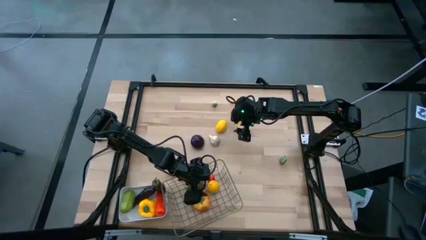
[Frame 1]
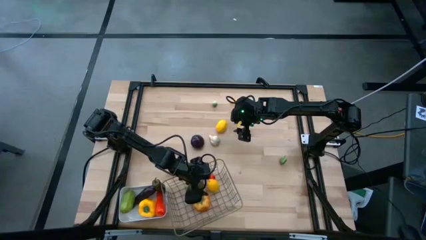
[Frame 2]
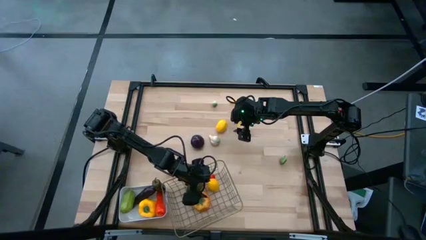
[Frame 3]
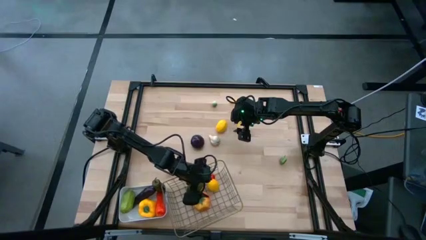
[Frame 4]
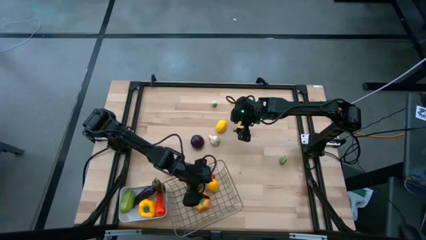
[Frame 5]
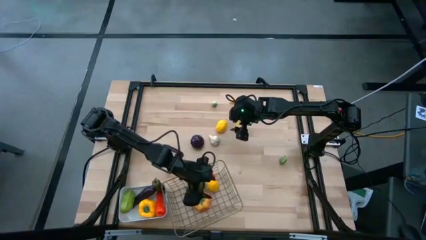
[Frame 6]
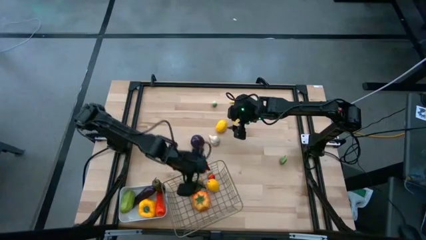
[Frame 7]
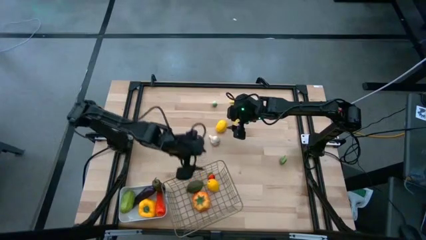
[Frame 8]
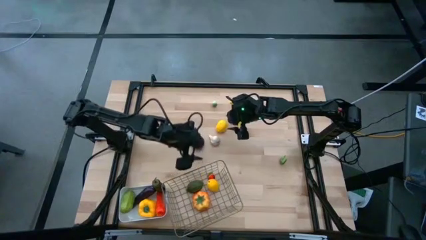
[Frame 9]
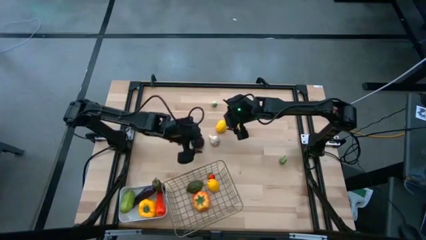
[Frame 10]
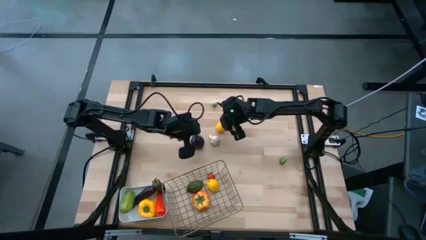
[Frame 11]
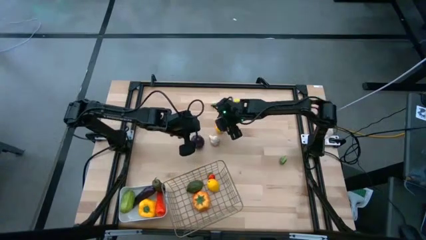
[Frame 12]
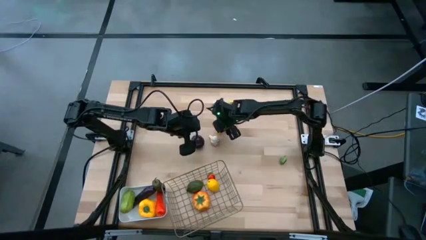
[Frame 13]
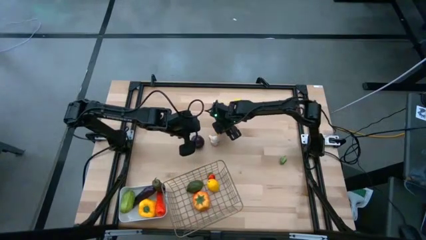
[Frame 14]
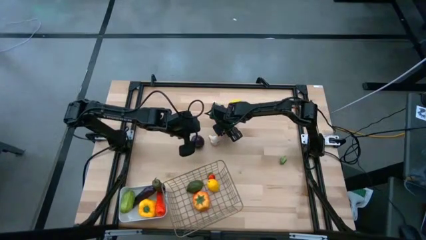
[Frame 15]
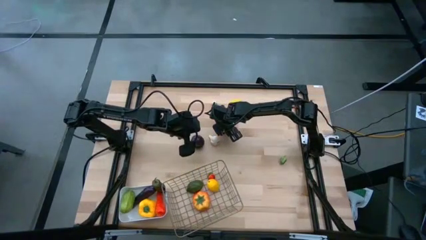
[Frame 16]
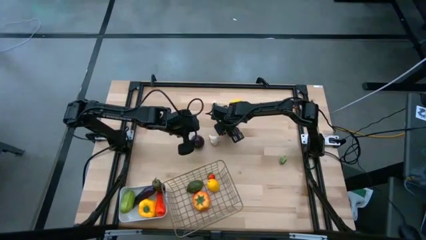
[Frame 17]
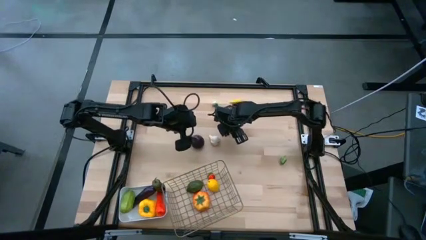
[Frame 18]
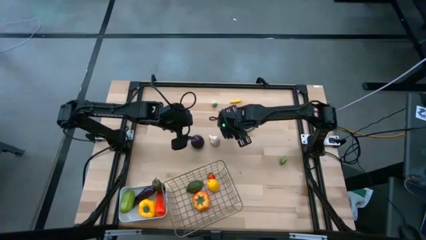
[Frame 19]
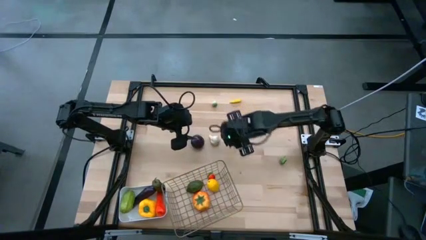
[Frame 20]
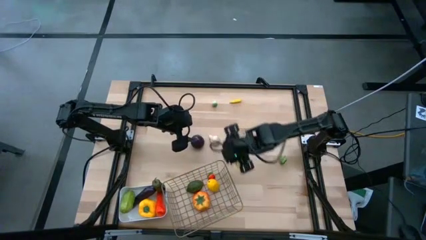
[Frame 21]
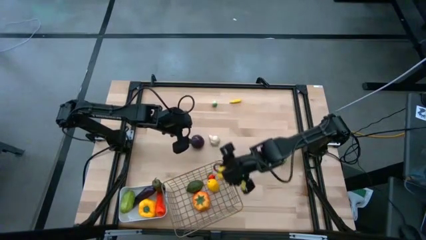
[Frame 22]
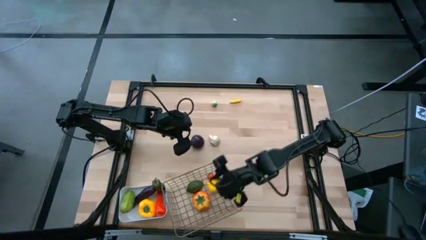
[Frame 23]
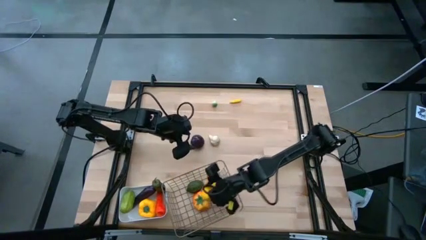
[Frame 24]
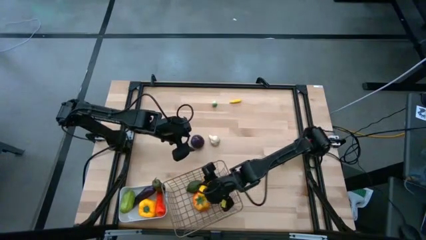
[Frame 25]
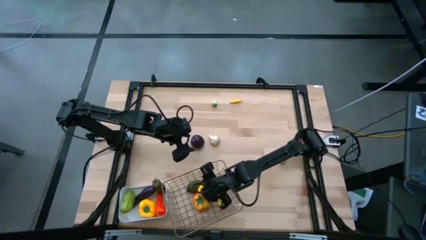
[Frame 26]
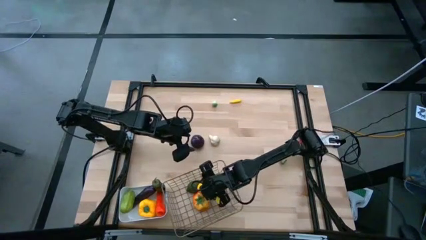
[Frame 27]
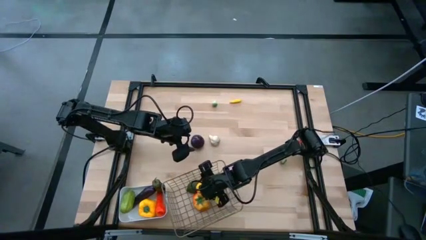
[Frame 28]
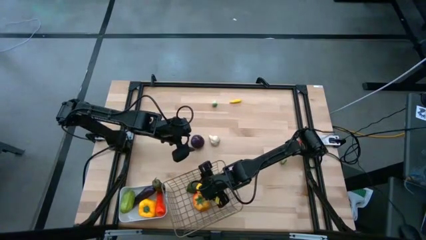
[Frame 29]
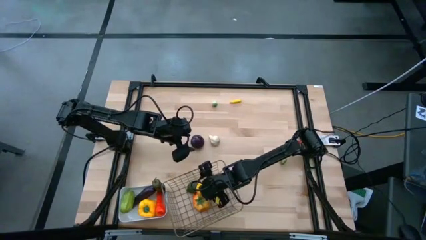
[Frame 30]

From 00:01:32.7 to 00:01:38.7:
Task: Sort produce into baskets
Put the yellow lemon into the wire basket

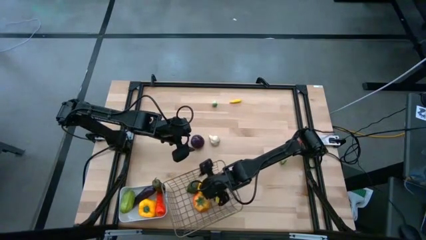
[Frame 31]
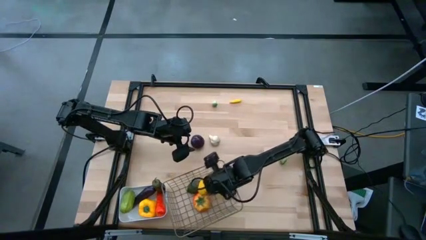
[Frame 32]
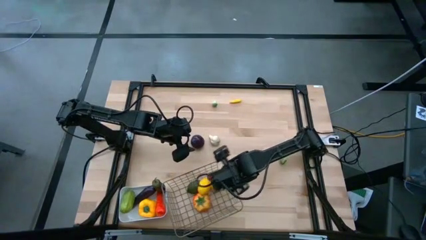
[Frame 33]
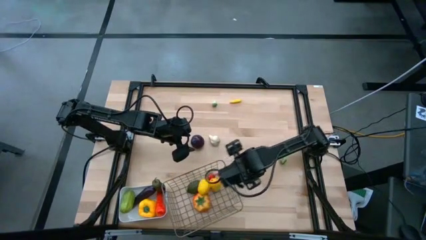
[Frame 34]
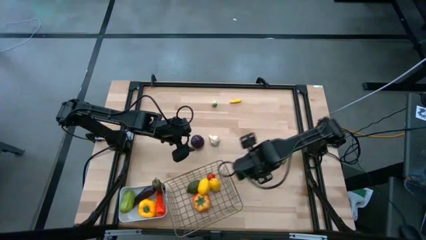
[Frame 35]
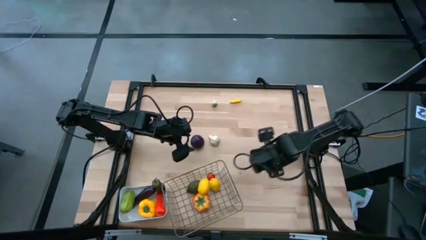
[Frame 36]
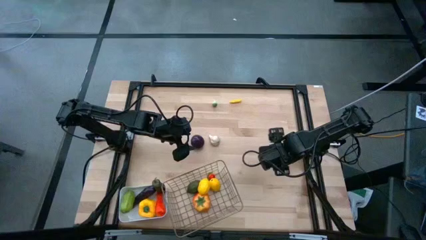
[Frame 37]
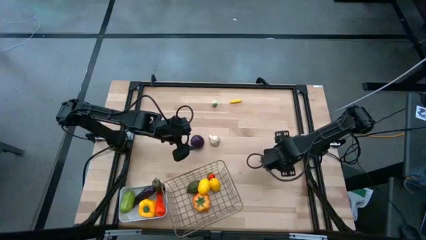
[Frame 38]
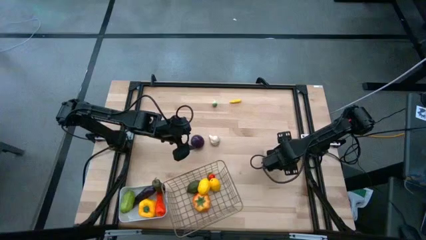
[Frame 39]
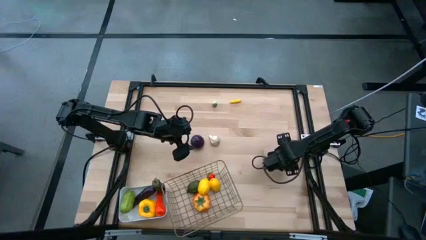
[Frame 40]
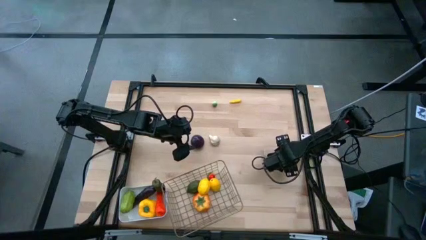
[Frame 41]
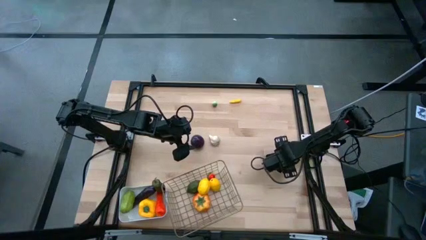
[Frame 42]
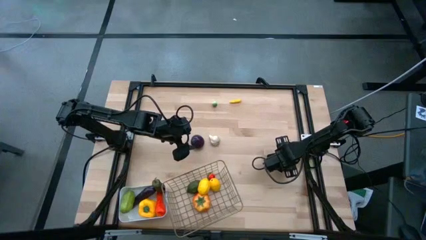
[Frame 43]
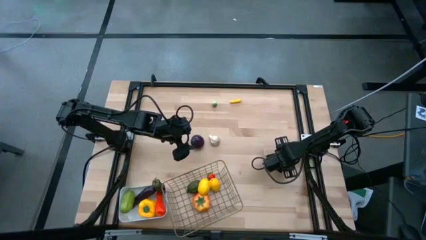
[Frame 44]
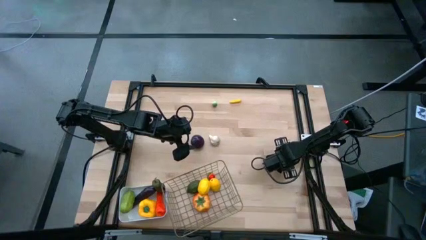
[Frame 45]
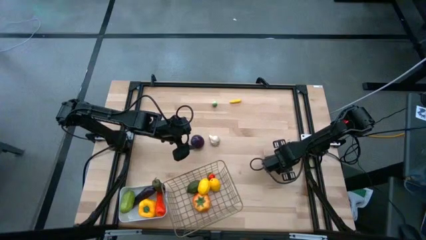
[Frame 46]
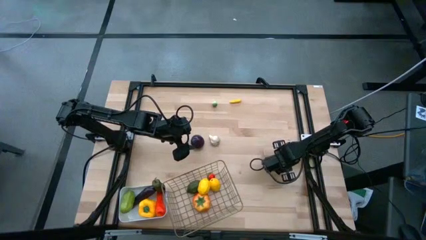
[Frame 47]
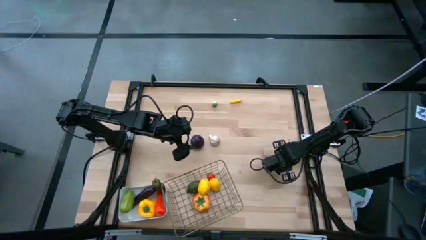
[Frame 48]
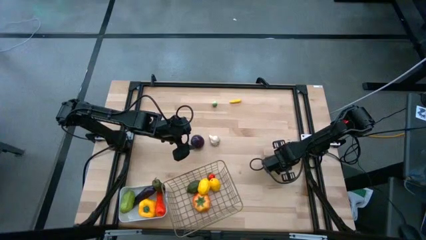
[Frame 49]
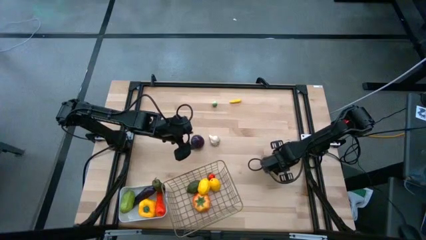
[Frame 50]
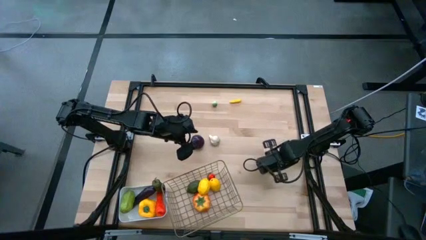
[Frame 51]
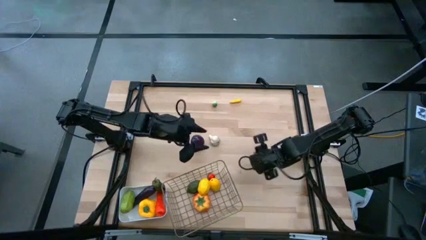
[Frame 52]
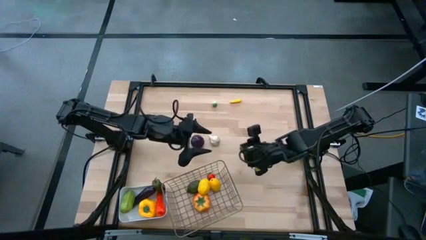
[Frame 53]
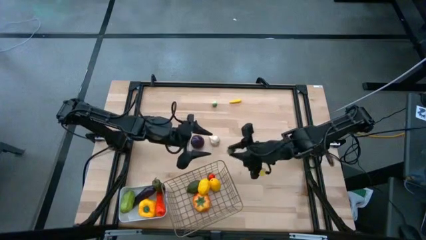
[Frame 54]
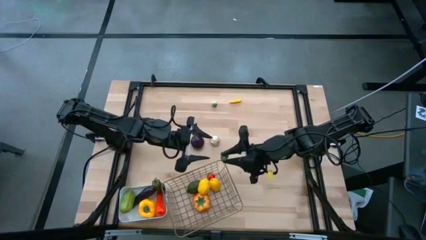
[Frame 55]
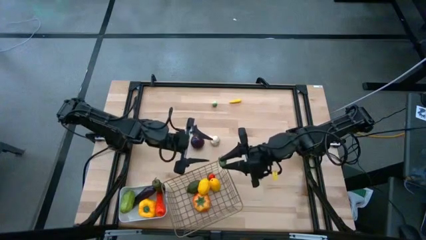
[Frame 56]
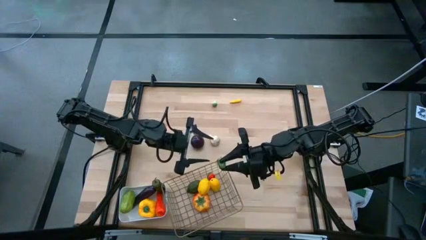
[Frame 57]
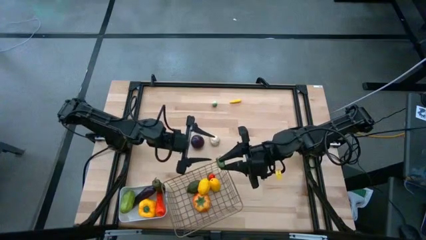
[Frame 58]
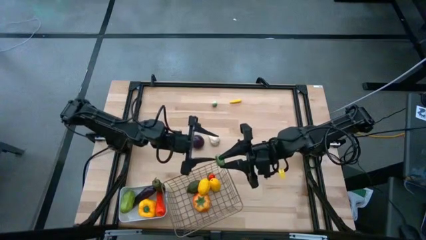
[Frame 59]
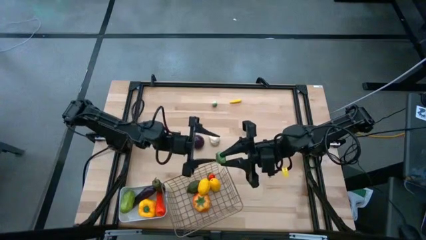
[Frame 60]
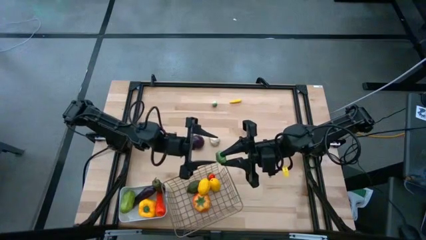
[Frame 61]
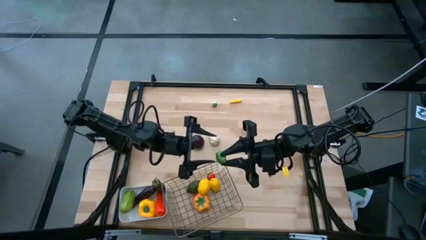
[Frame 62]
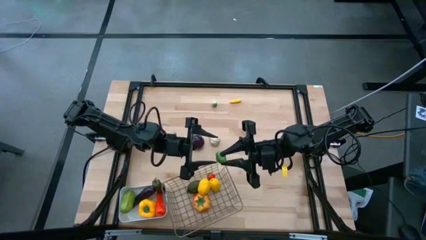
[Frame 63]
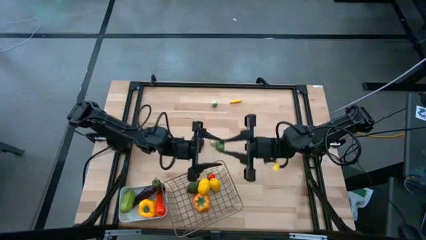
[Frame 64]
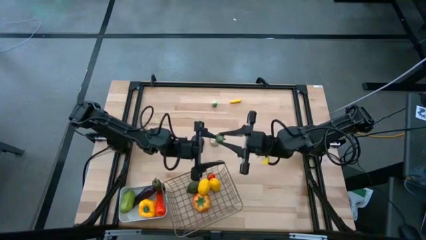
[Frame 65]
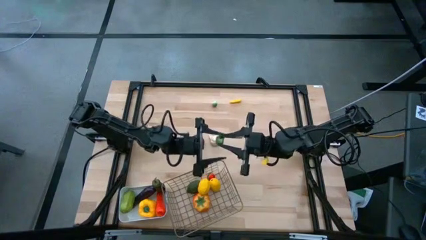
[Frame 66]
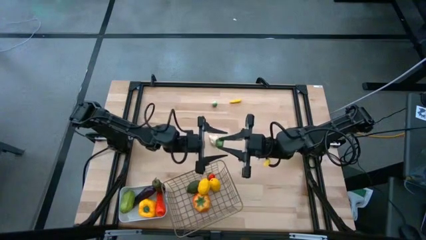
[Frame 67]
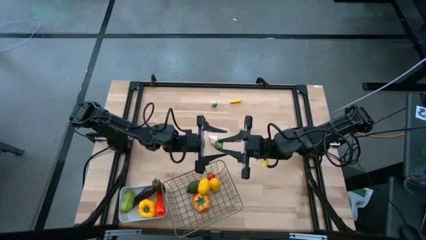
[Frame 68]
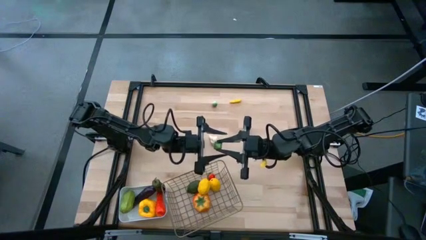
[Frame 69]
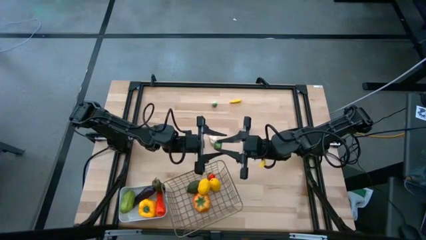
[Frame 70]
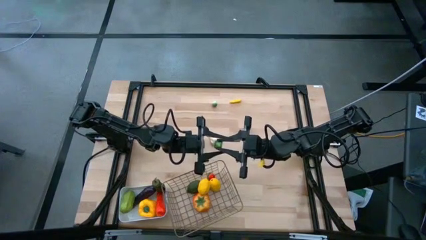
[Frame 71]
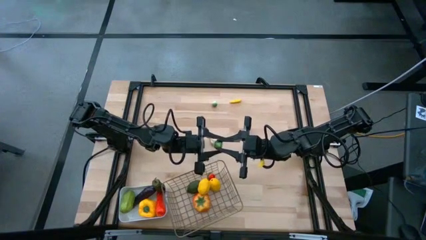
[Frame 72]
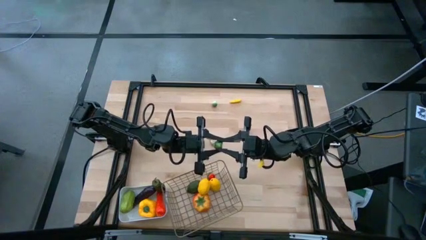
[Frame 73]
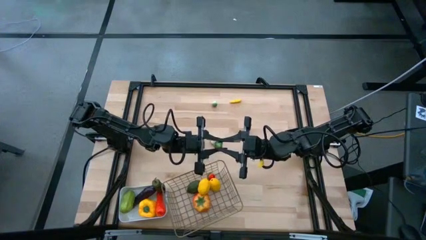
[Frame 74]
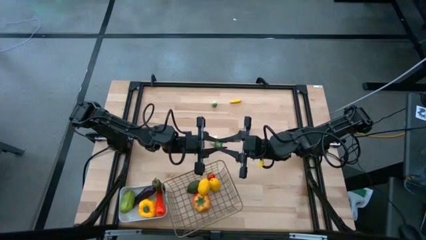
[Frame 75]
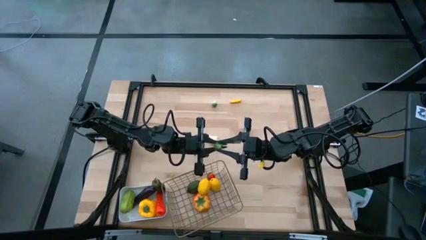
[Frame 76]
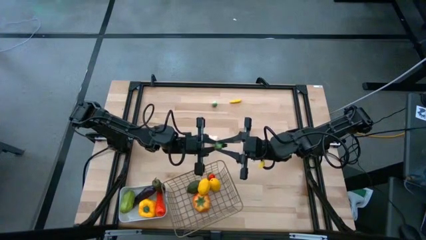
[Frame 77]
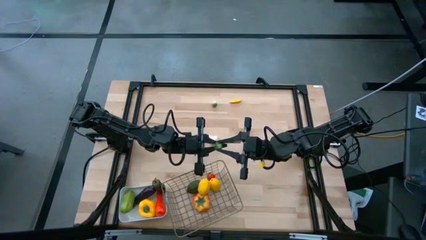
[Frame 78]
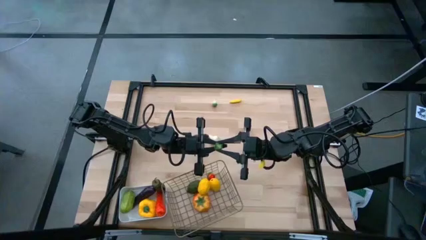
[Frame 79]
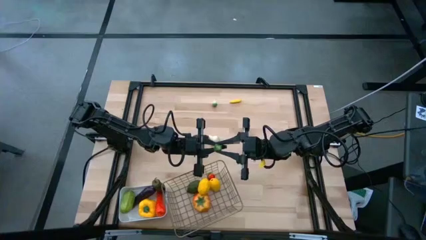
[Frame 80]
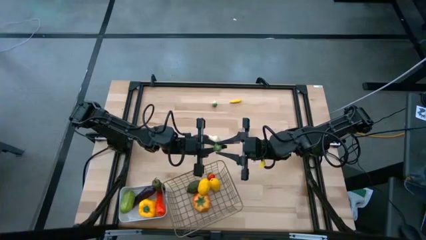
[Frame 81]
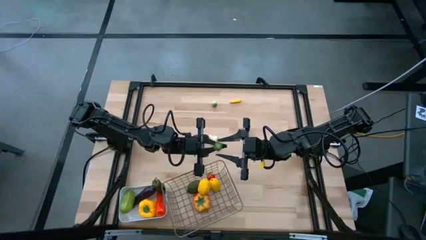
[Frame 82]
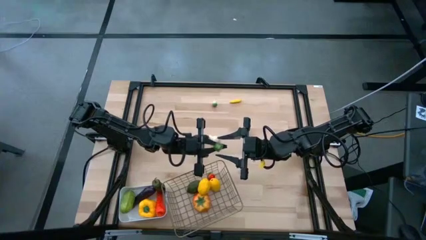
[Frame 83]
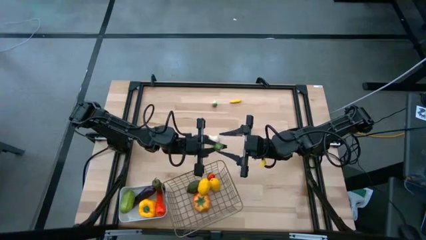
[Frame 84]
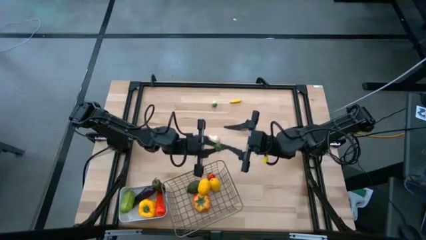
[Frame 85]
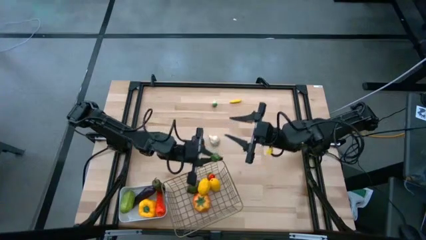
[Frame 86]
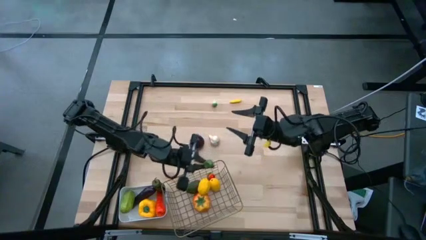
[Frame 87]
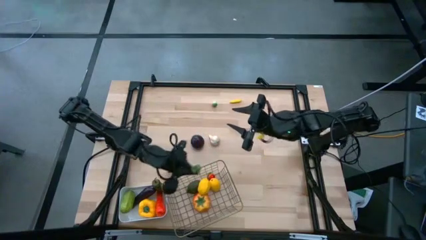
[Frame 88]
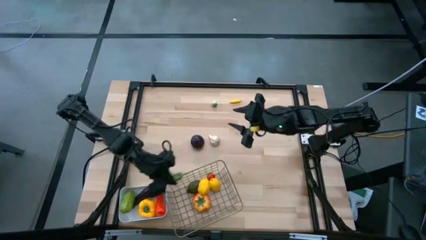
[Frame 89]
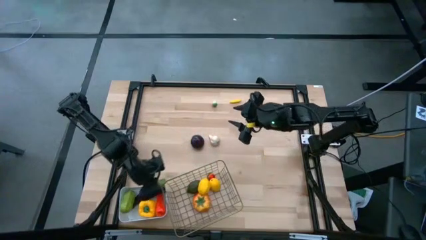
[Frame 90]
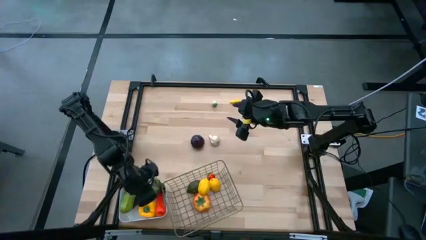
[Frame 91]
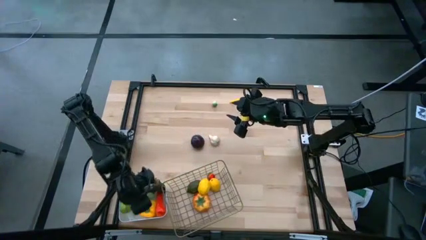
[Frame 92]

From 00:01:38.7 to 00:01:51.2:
Put the green bell pepper into the white bin
